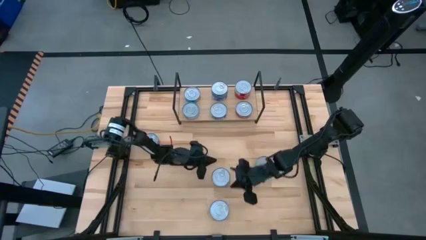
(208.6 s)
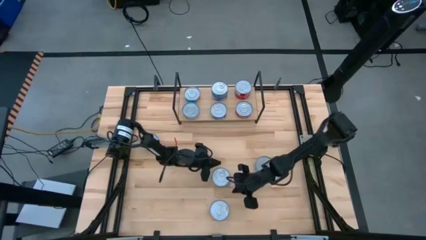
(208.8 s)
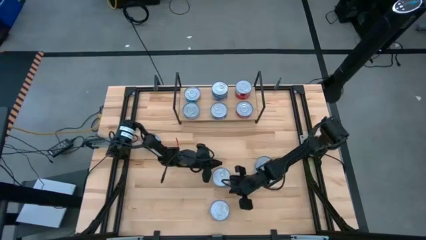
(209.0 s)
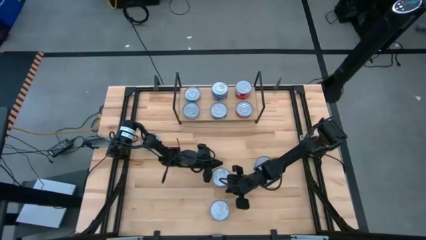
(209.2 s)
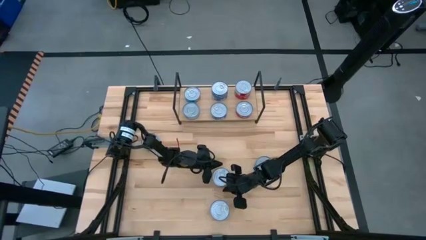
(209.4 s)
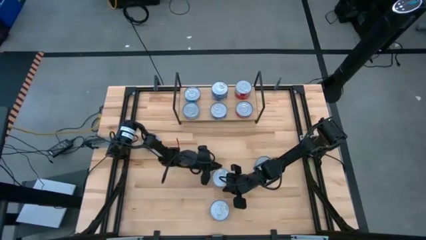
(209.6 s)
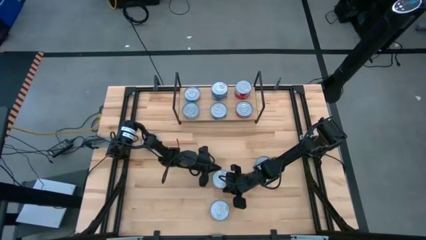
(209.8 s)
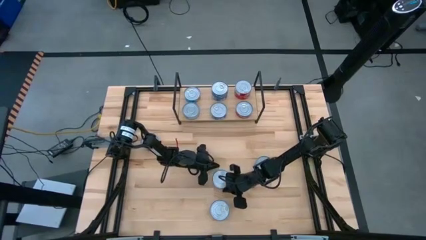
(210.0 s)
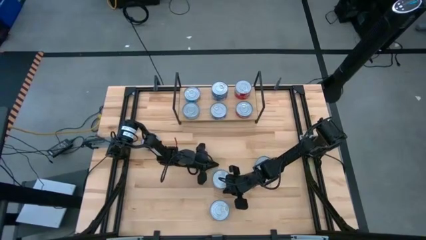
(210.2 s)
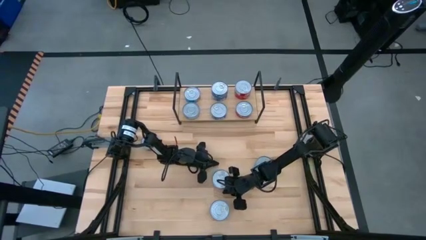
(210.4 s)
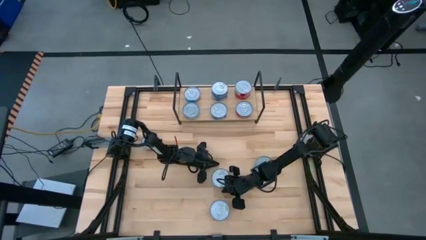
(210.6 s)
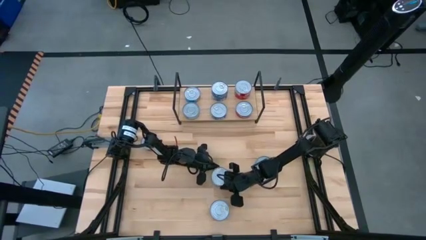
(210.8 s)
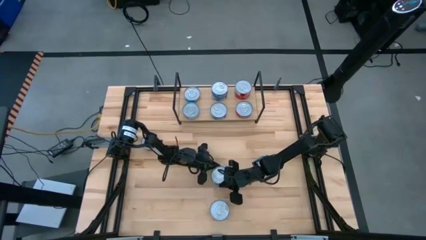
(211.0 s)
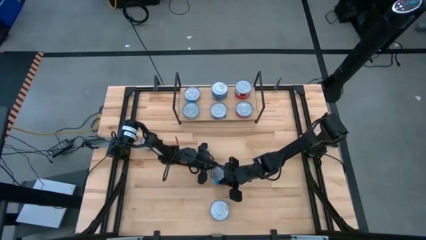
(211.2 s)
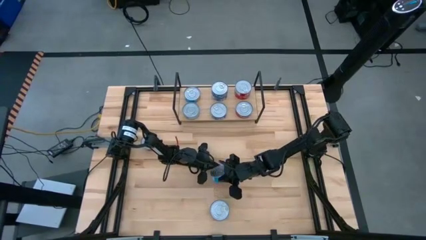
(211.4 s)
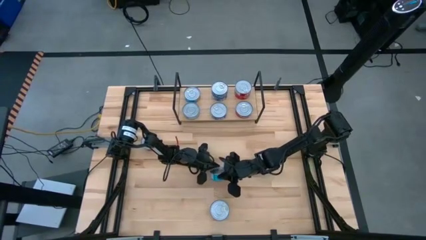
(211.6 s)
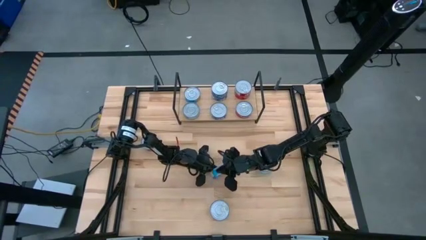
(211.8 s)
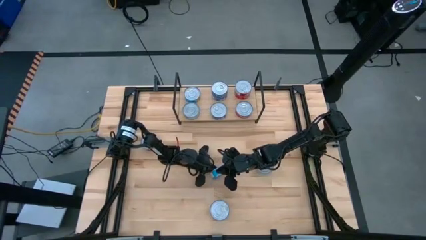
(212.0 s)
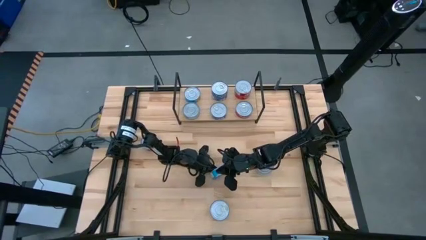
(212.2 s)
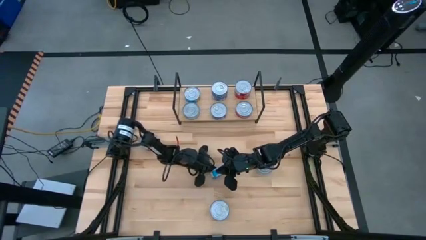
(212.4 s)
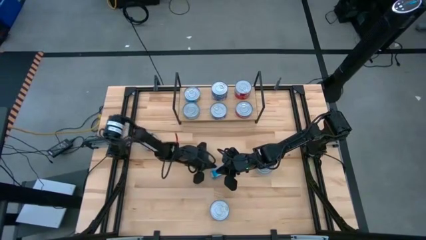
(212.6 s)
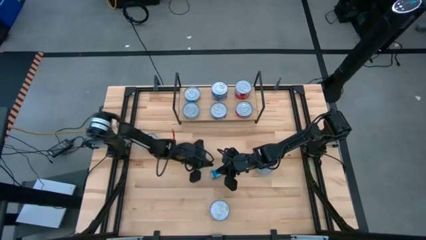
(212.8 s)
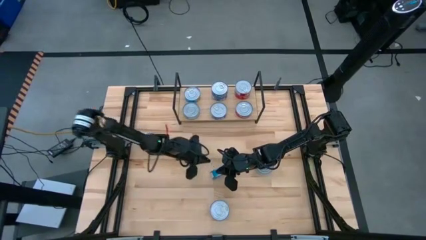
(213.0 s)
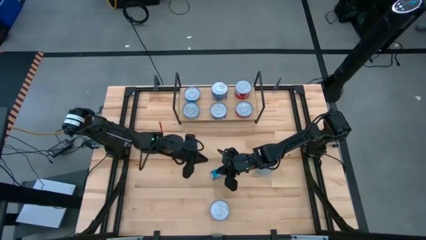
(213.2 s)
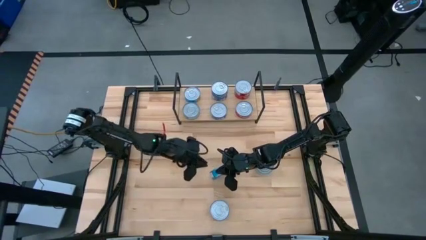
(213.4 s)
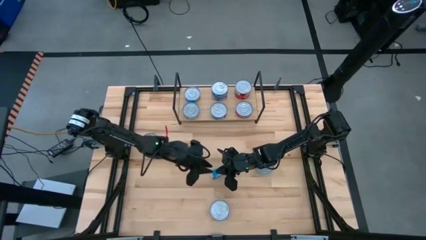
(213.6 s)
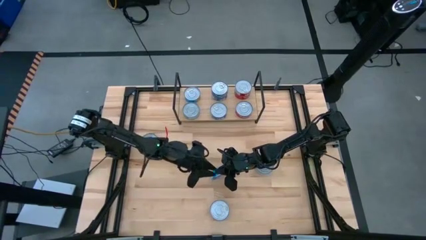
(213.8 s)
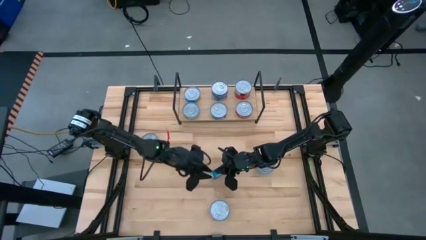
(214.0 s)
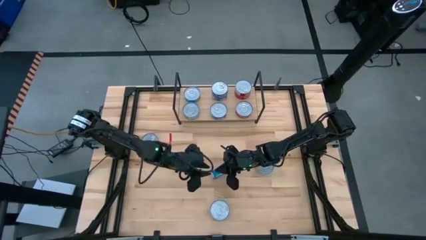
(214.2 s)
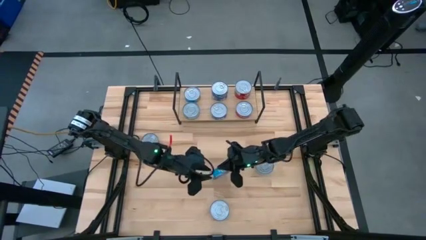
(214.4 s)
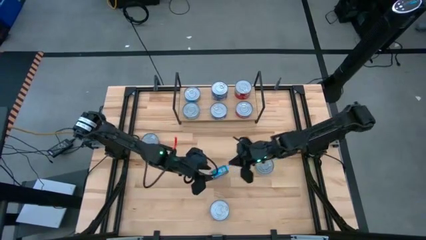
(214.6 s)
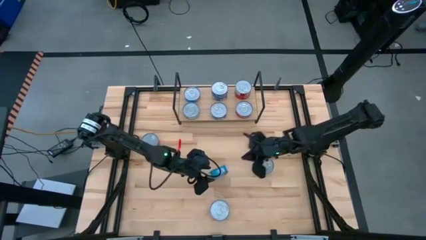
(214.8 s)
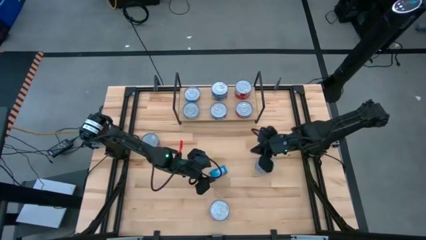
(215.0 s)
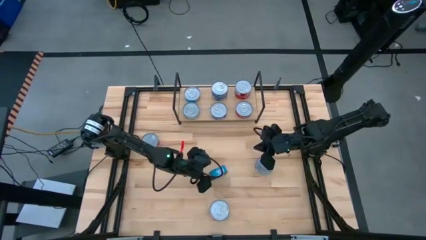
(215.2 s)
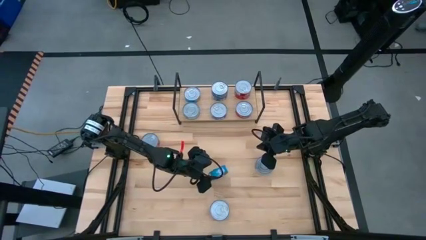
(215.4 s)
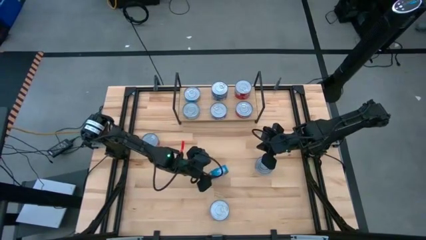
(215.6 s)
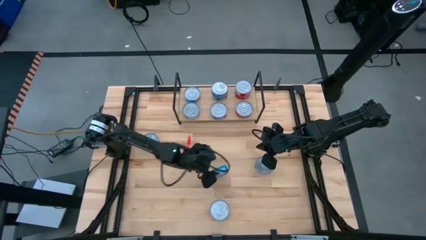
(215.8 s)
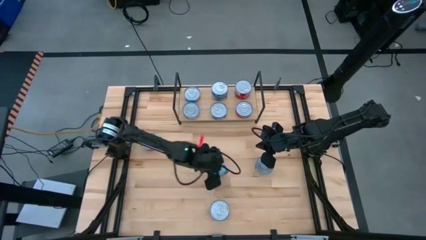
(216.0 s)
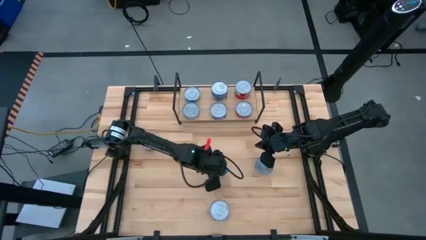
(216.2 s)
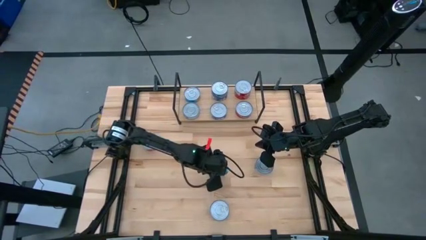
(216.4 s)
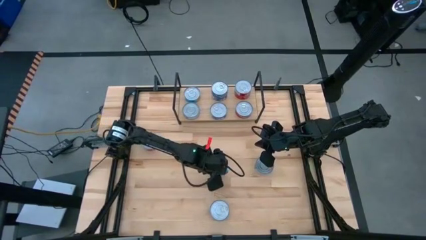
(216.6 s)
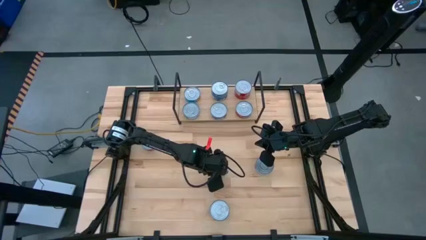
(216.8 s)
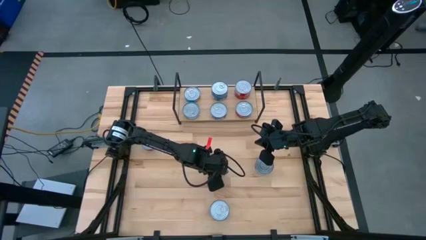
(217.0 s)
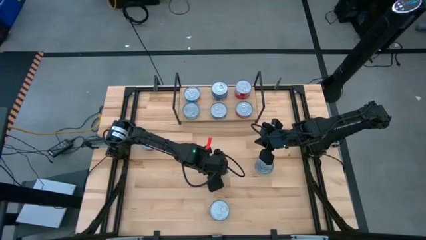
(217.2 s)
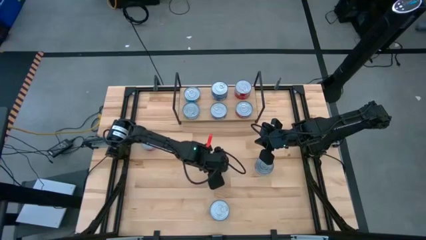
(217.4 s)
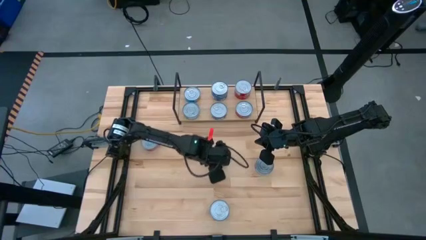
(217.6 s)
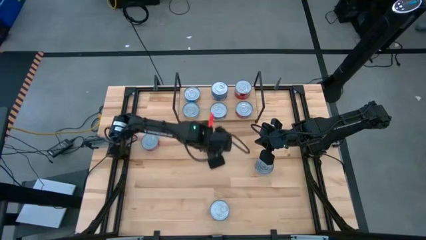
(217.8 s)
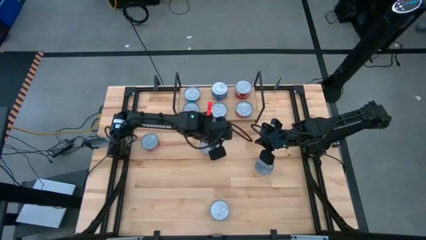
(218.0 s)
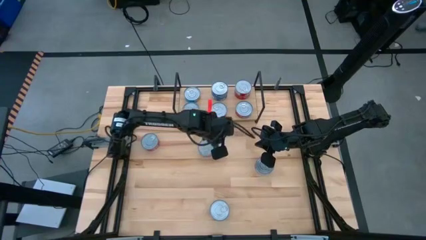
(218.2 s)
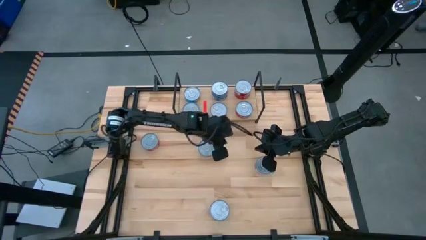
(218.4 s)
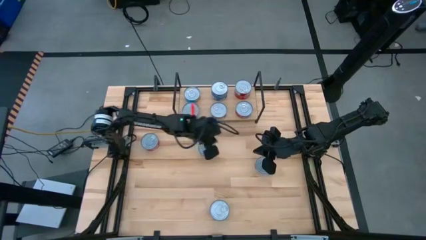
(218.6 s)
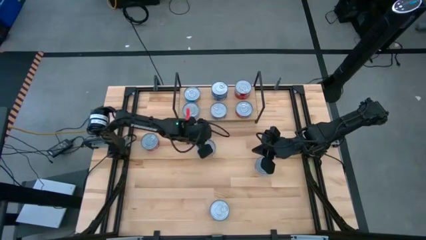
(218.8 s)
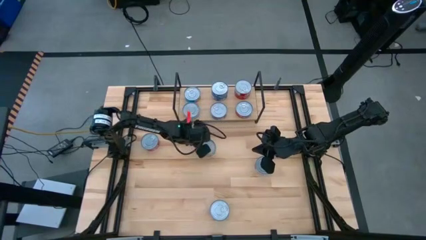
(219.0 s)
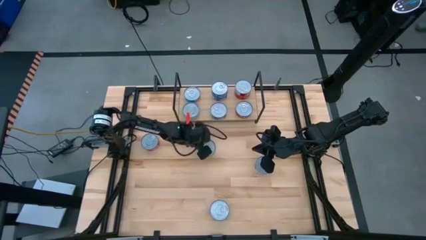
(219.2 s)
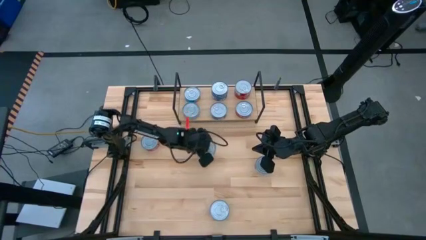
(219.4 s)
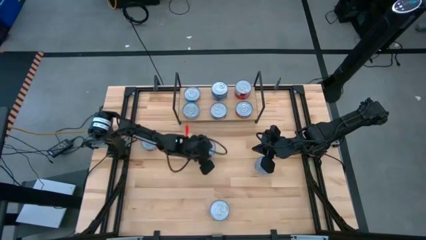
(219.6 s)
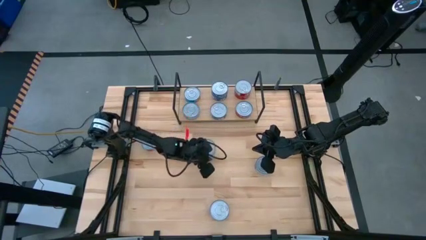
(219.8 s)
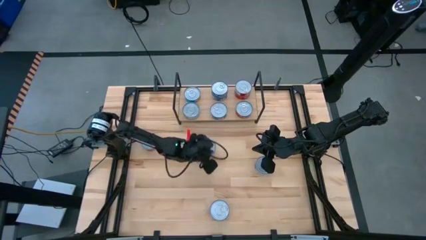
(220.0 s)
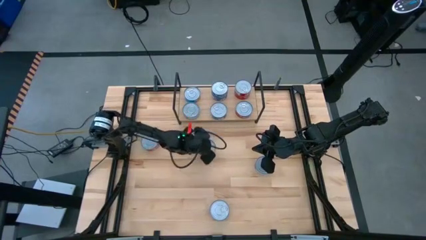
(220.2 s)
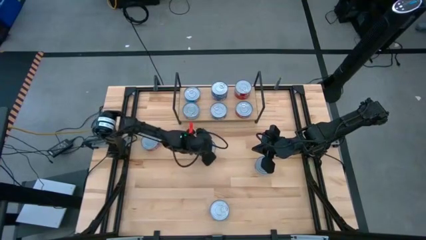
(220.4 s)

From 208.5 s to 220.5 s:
Task: Stack canned seafood by type on shelf
Stack the center light blue tuna can on top of the other light blue tuna can on the shelf

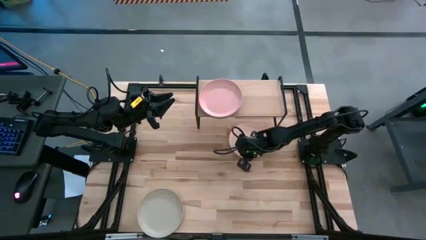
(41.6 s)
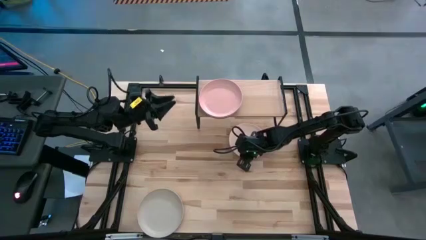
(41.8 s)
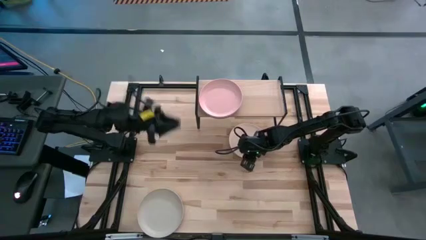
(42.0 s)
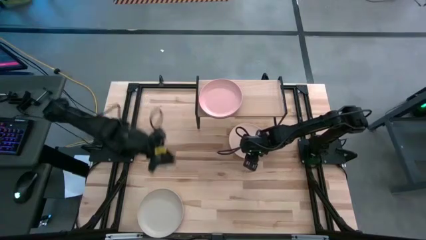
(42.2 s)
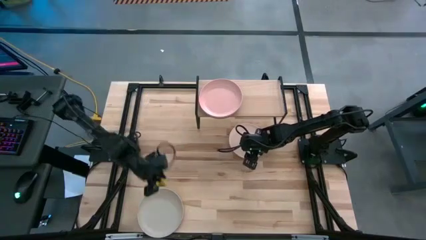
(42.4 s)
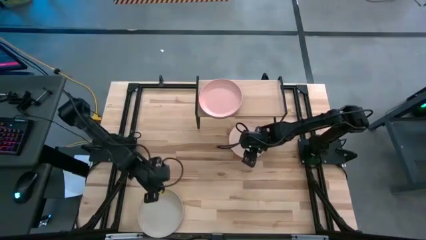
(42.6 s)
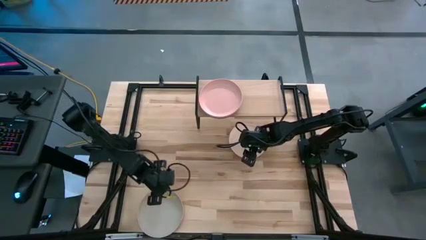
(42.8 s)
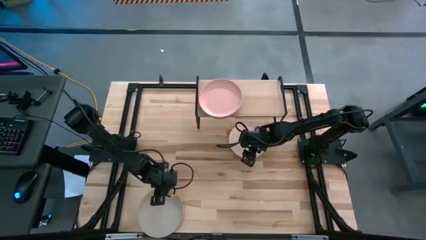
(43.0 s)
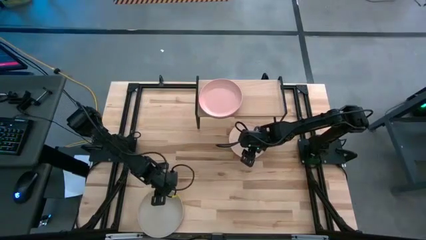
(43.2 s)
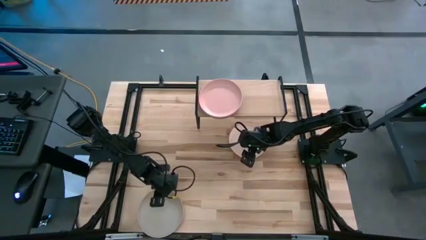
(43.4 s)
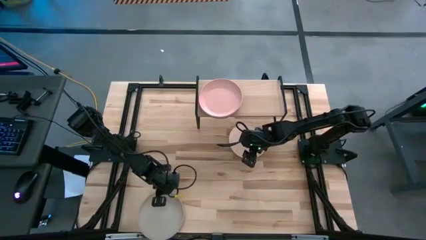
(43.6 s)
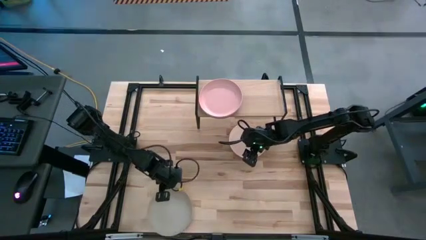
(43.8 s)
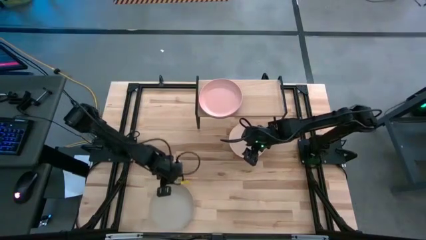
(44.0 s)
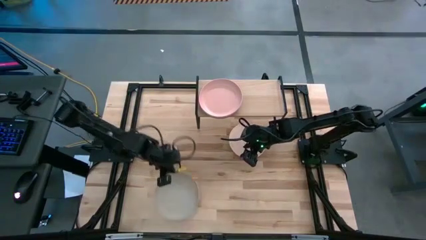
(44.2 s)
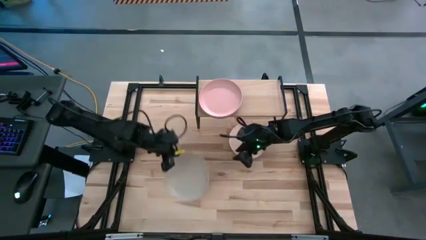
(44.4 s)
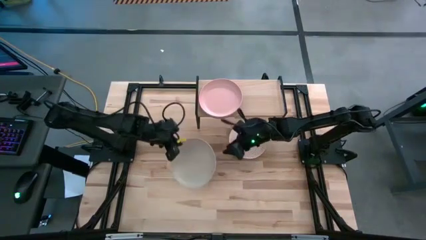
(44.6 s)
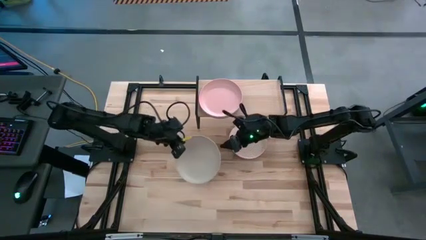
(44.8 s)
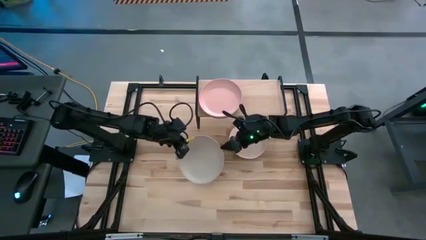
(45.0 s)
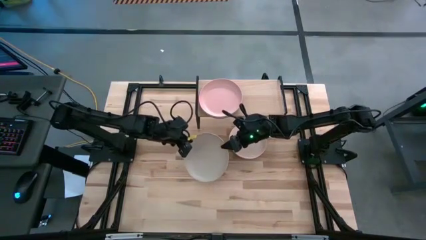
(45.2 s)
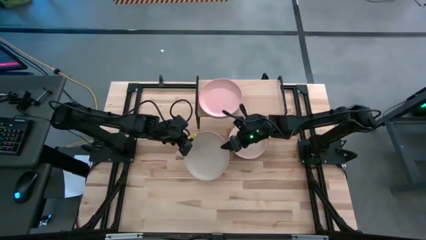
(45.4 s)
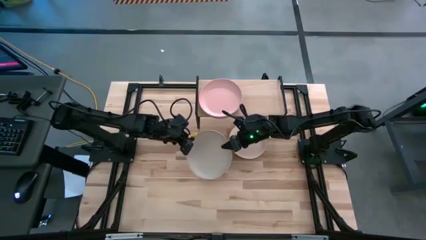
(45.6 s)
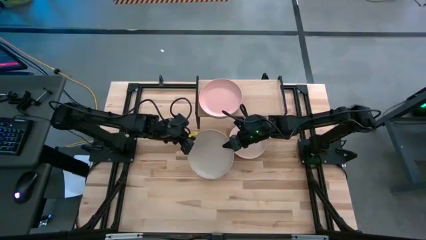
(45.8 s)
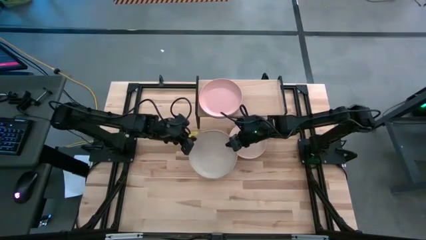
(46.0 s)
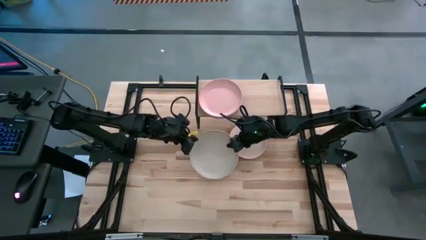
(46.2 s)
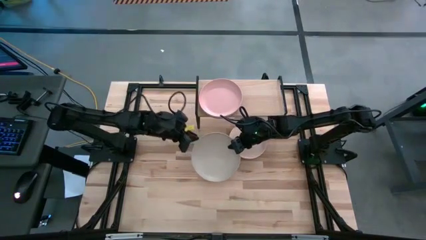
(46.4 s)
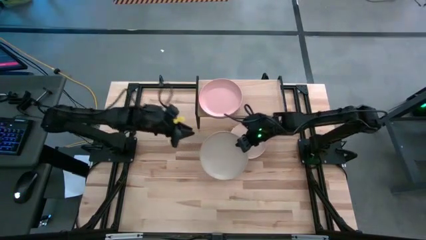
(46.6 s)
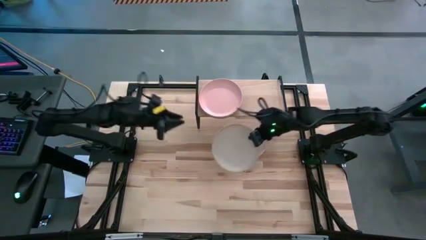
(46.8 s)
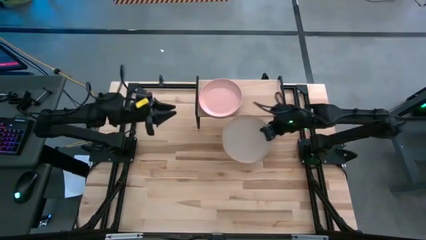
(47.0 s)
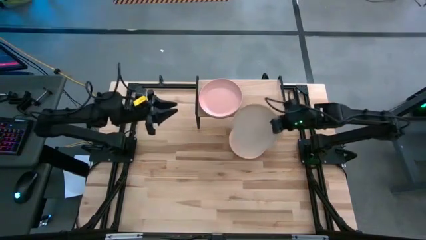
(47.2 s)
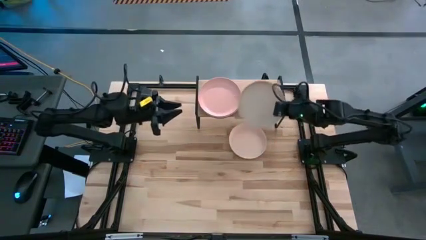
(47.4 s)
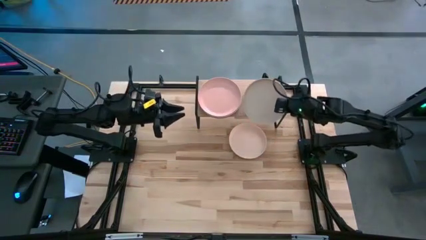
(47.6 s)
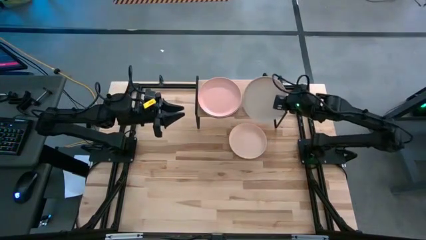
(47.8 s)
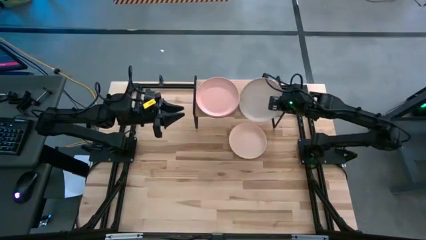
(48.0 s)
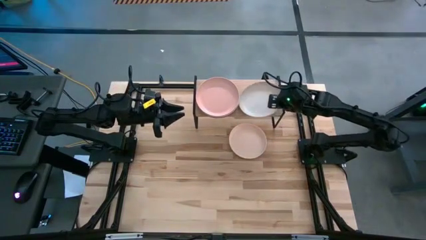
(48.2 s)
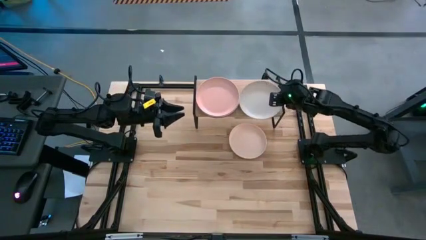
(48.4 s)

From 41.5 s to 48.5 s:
Task: Place and stack plates onto a shelf
Put the white plate on the shelf
